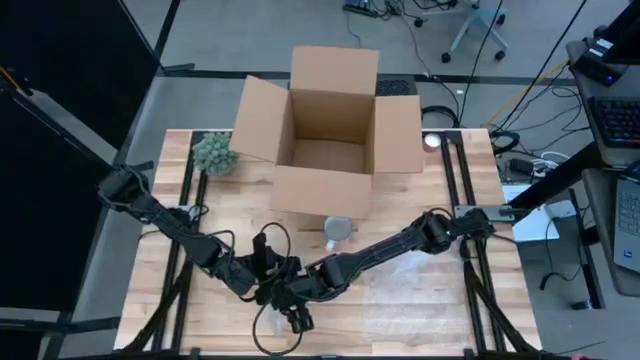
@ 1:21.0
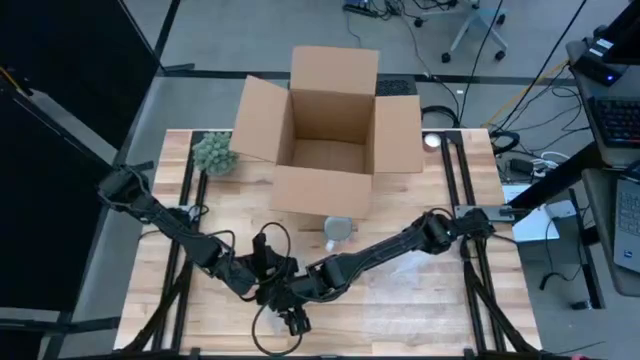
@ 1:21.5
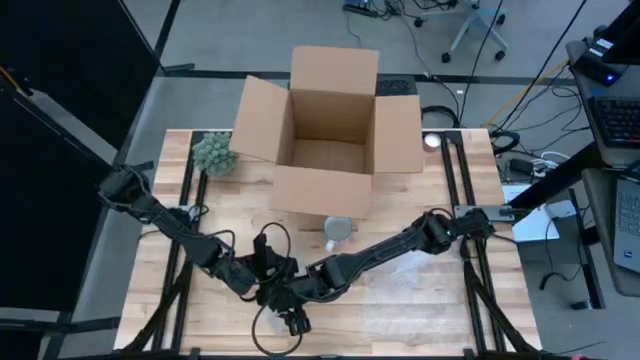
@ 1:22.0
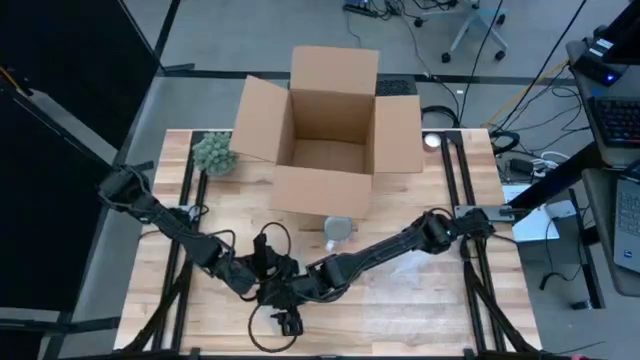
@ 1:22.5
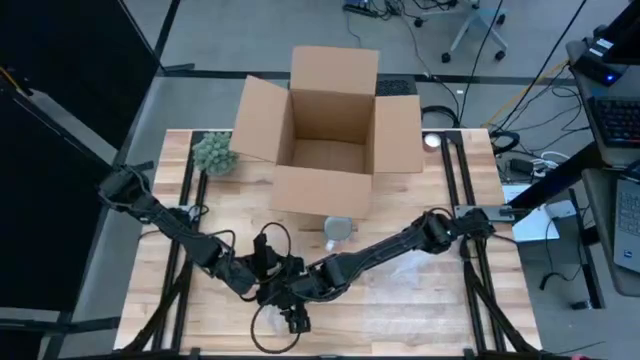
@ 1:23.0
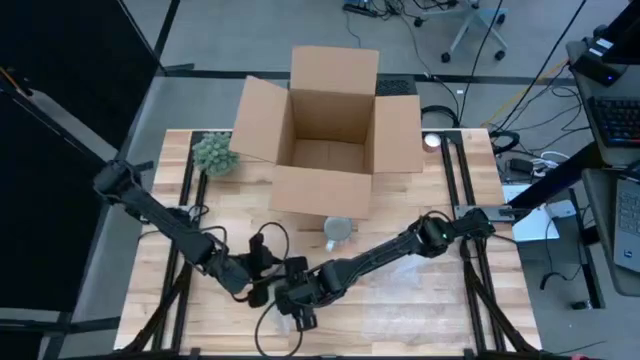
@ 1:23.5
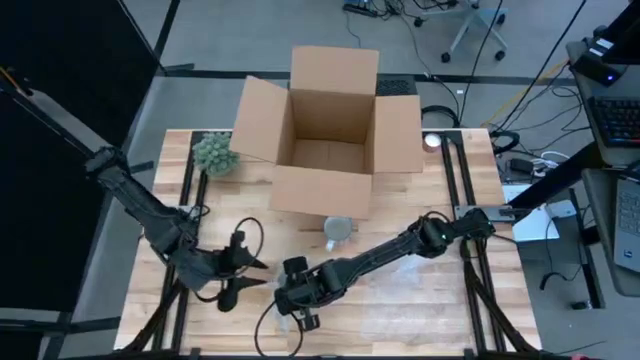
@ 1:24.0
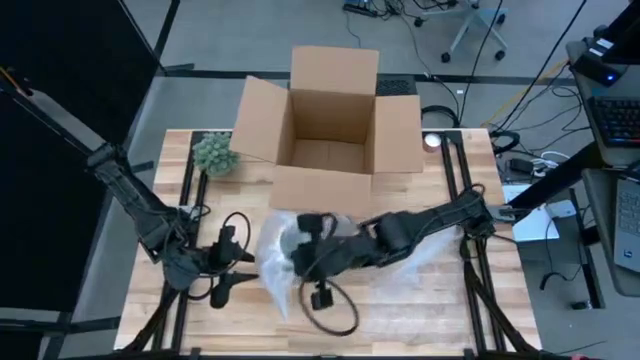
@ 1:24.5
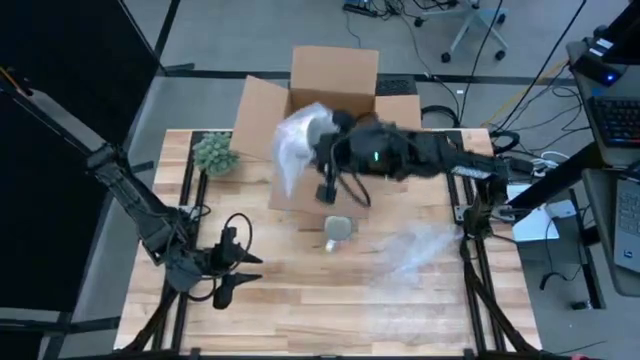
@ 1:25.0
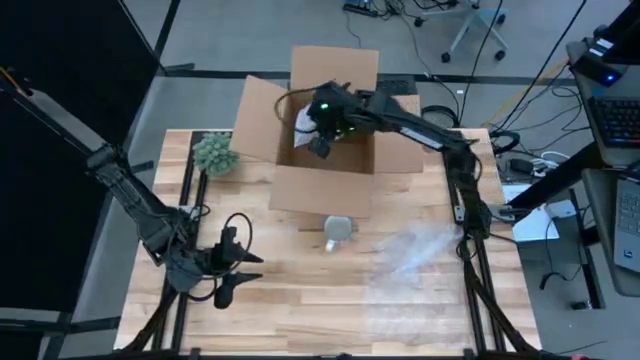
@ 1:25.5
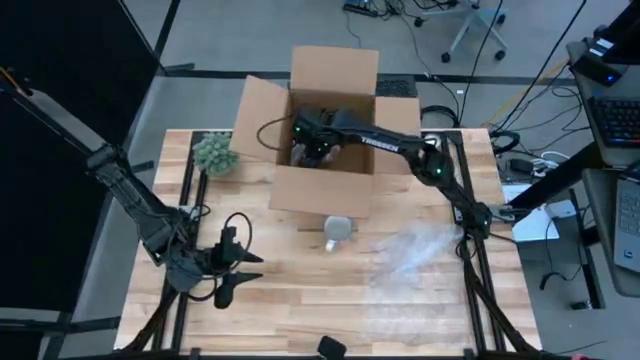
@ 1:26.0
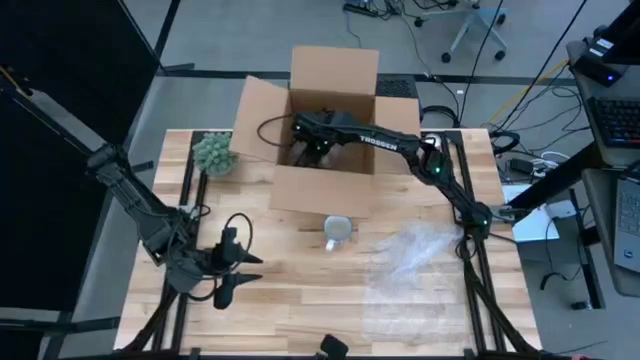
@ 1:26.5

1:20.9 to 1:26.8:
Task: wrap mug
Put the wrapped orange mug into the box
